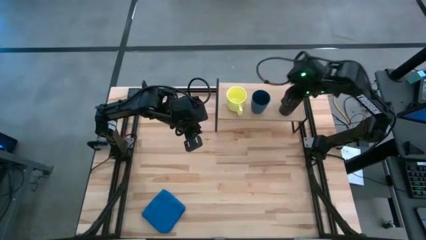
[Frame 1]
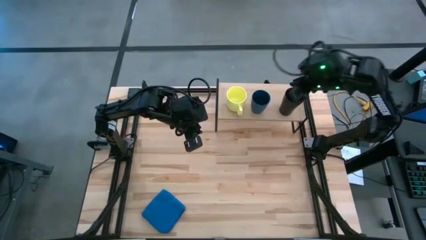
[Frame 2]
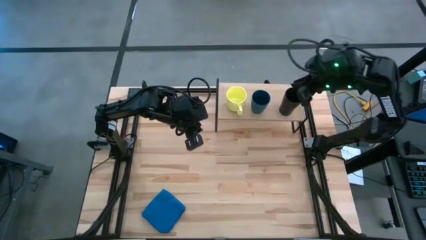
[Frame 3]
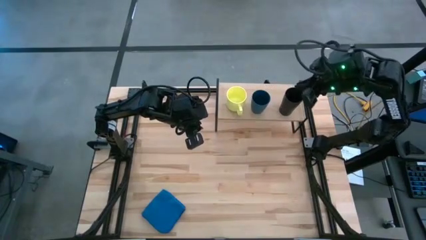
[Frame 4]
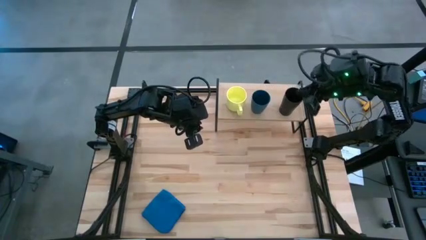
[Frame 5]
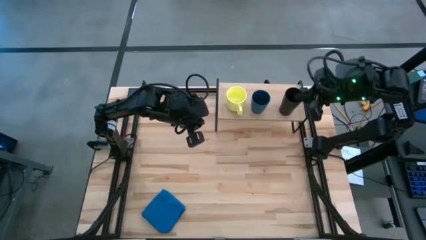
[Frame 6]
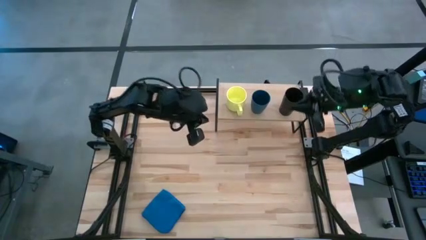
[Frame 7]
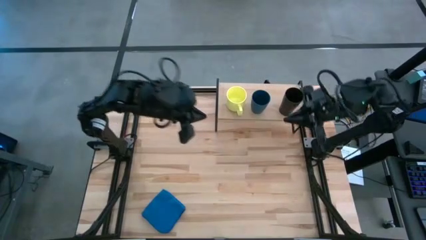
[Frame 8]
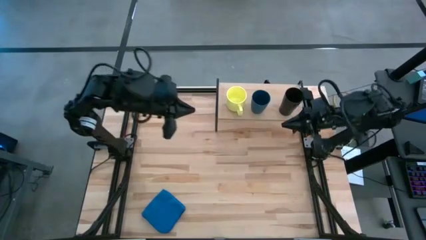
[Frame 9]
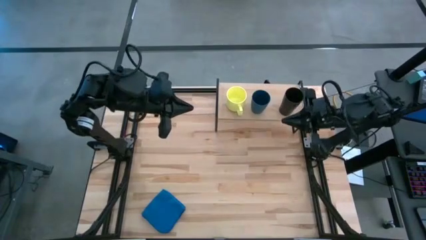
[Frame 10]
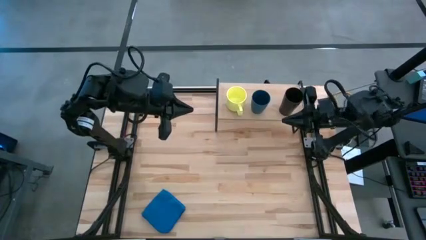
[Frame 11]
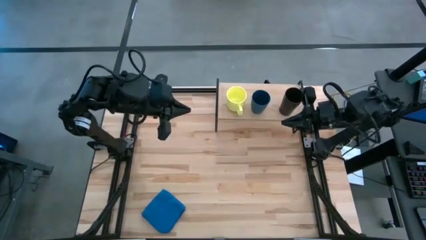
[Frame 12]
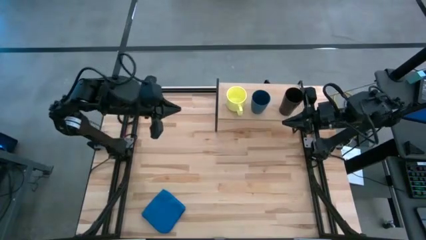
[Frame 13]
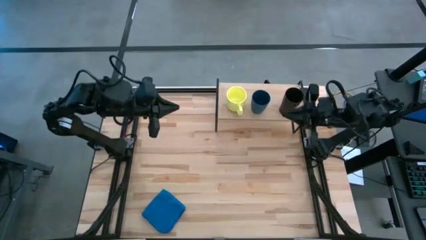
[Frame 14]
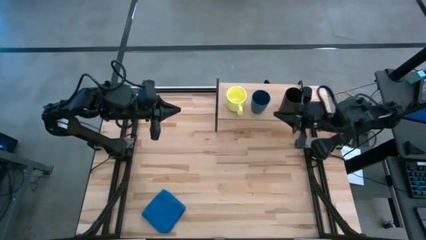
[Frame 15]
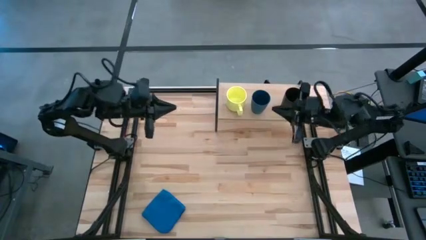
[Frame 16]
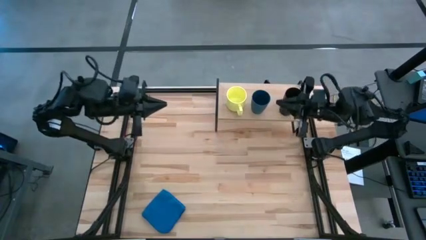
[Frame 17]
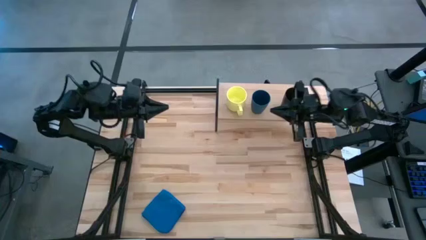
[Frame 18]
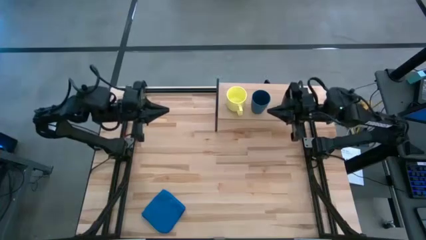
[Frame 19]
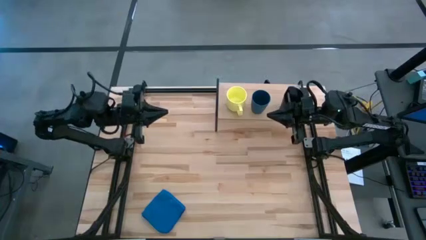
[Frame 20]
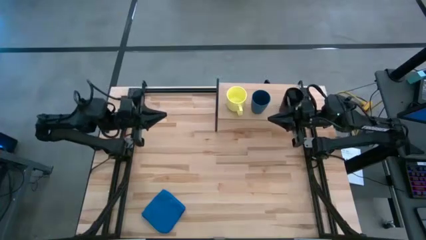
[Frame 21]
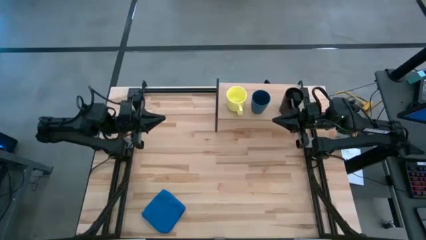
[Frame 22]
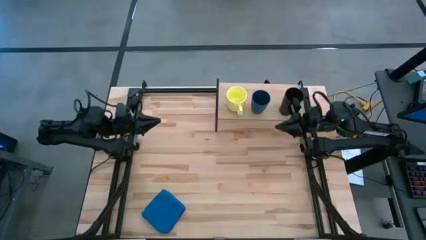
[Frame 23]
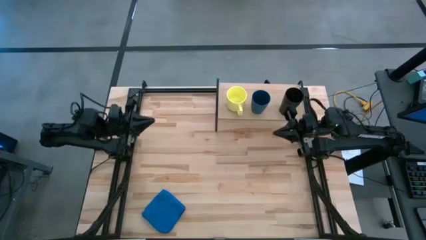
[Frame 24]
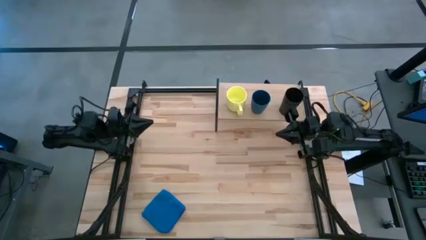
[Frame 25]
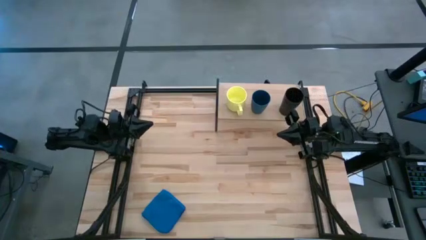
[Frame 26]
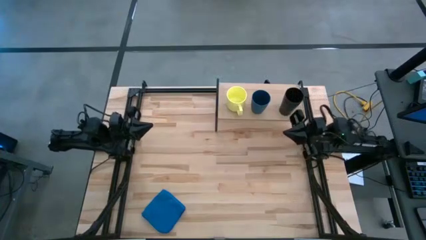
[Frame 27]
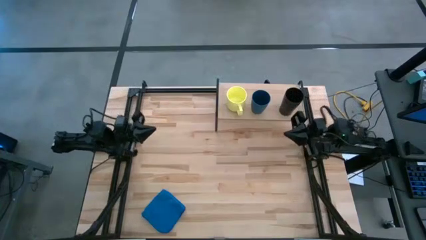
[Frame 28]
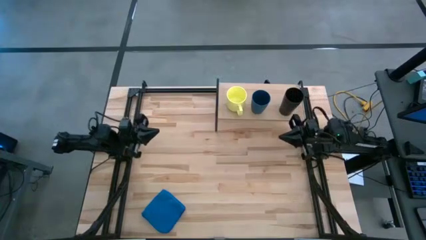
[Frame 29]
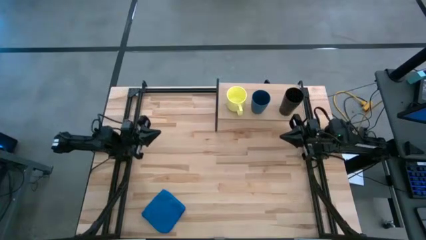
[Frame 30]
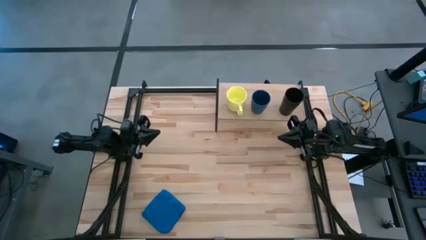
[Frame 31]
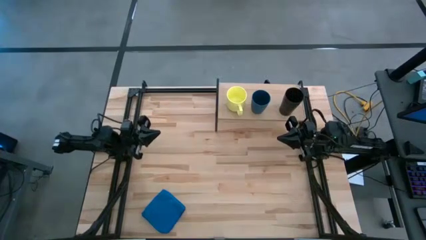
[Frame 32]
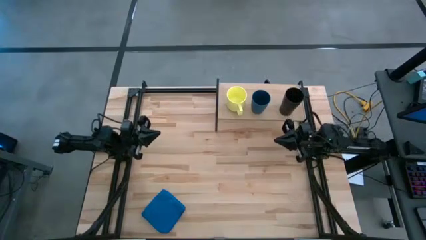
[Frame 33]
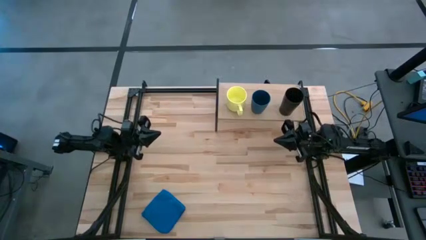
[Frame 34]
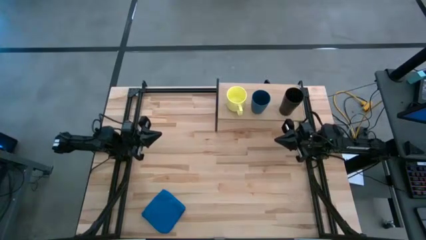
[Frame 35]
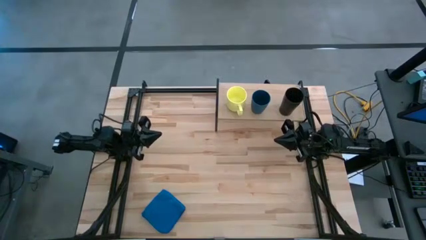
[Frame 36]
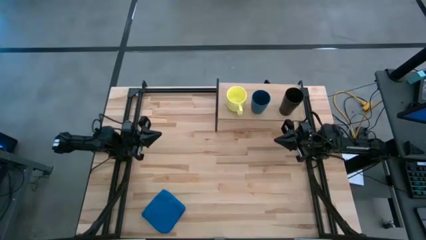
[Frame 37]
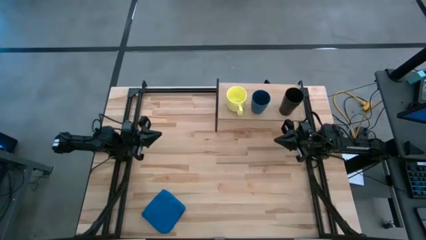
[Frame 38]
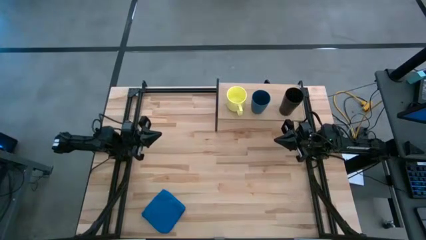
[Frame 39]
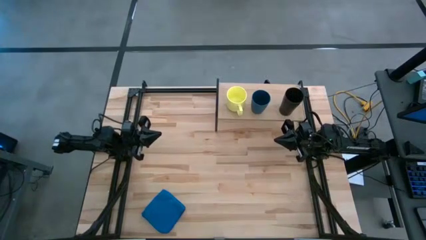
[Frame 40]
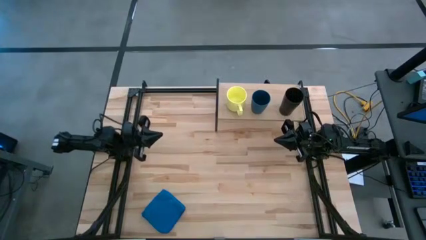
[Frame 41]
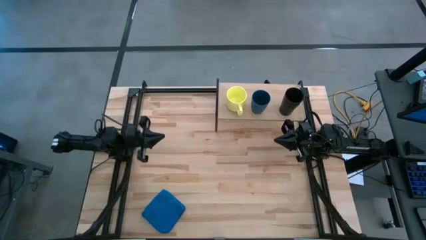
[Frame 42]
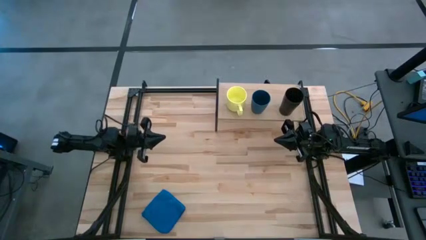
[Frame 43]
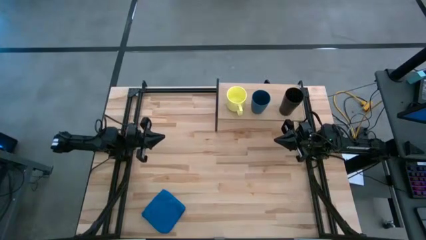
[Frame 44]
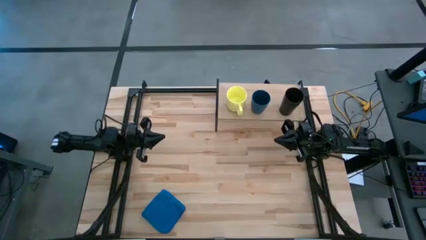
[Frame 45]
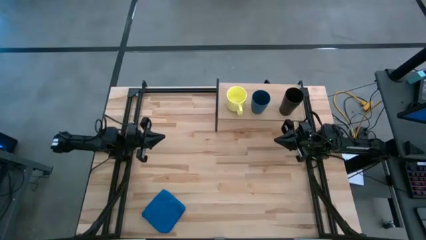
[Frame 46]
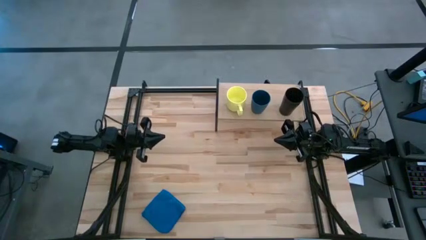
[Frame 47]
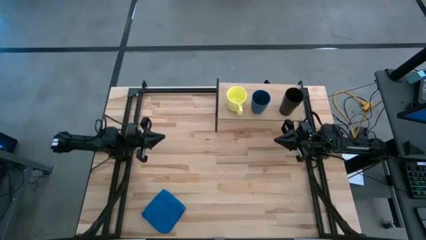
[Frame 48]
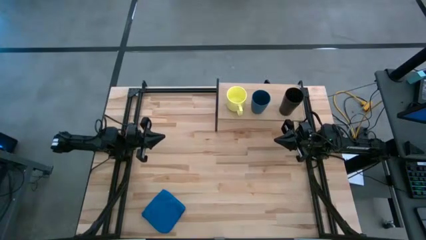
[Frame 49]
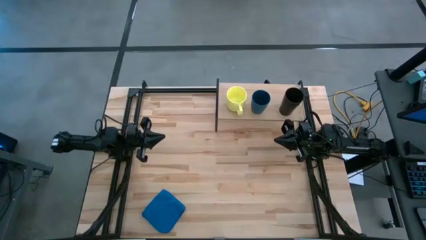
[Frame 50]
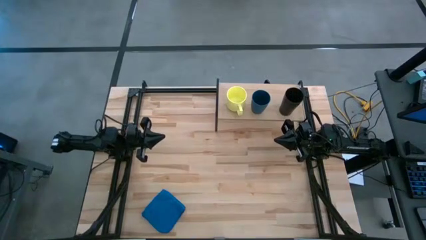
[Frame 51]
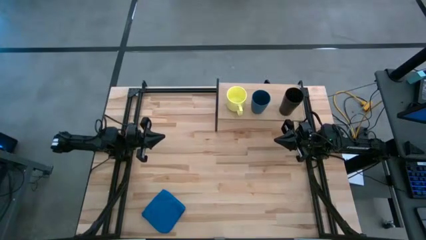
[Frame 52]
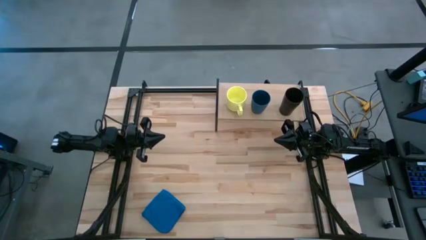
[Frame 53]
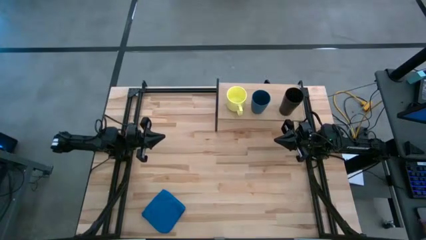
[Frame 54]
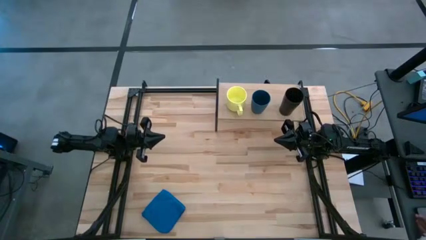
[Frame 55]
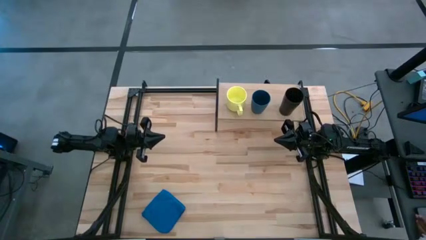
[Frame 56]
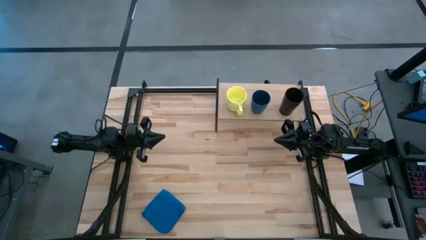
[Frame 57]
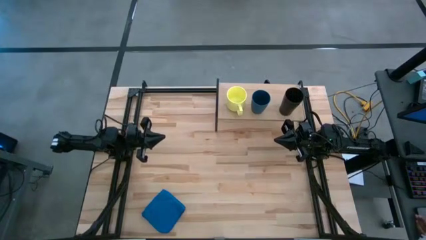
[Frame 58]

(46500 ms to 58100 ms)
Task: Stack small to large cups/mugs on shelf
Return to Home Position

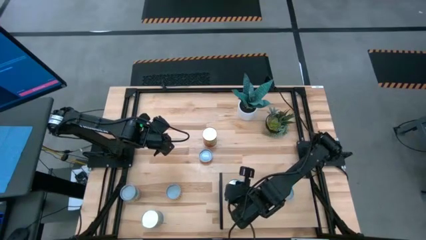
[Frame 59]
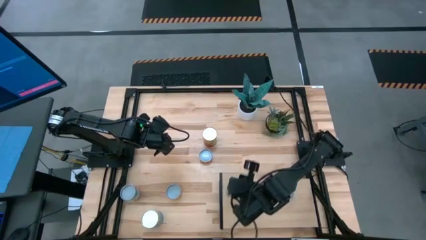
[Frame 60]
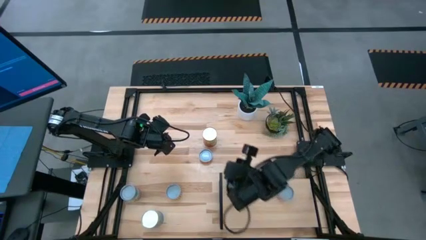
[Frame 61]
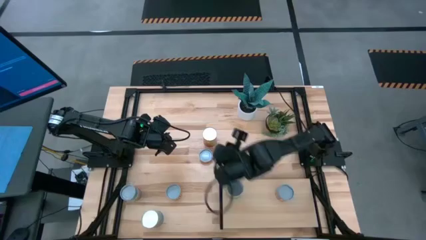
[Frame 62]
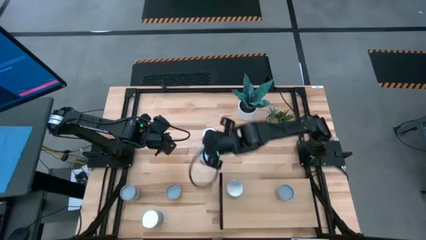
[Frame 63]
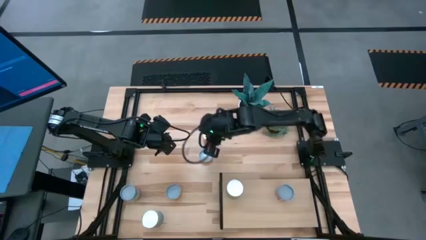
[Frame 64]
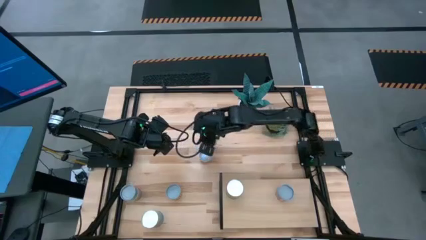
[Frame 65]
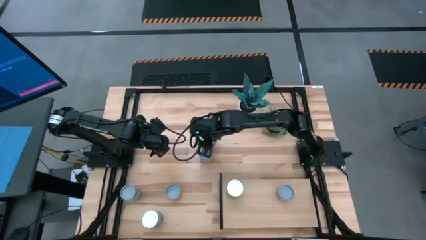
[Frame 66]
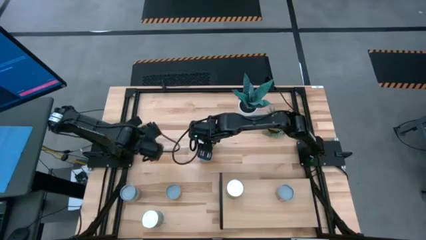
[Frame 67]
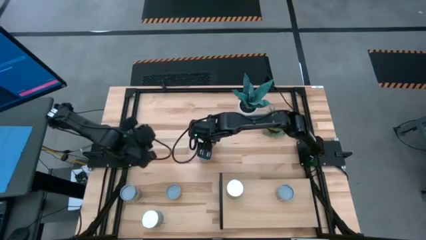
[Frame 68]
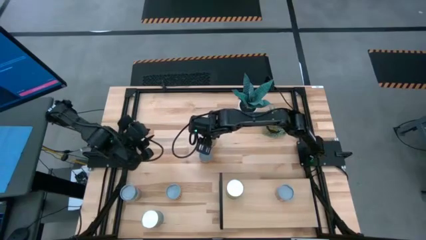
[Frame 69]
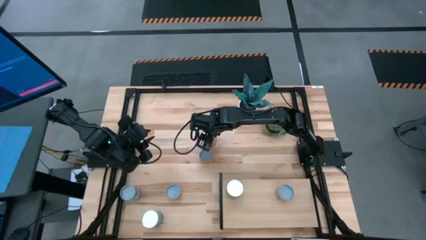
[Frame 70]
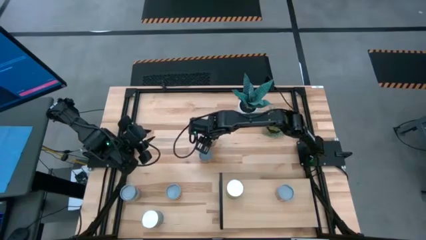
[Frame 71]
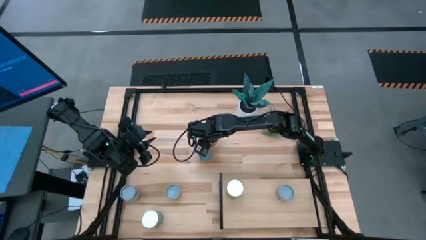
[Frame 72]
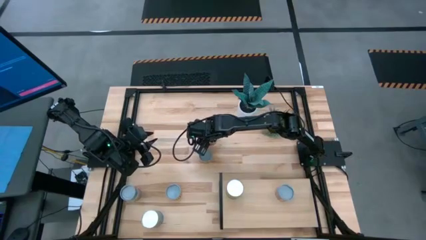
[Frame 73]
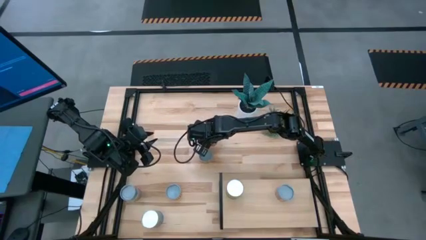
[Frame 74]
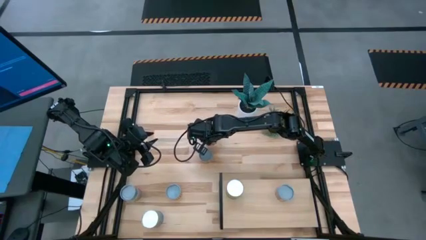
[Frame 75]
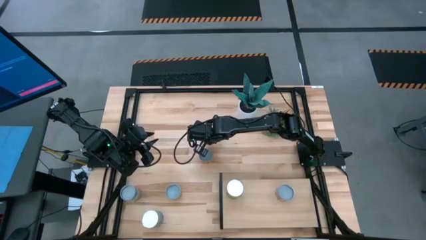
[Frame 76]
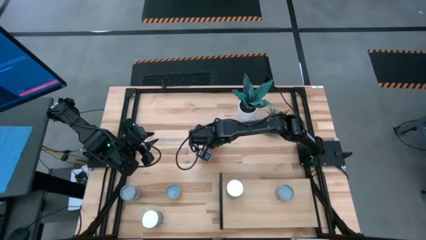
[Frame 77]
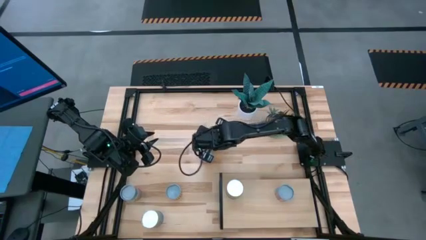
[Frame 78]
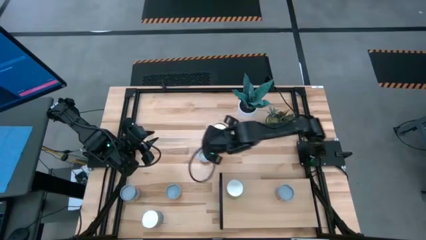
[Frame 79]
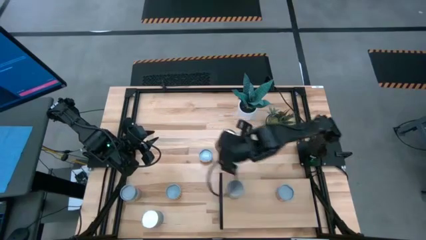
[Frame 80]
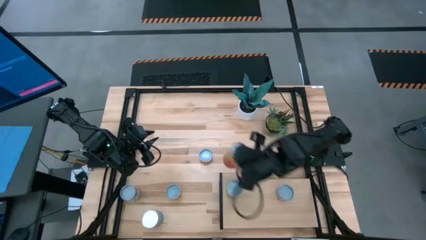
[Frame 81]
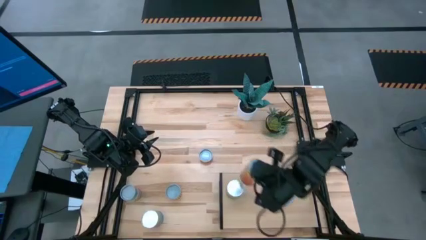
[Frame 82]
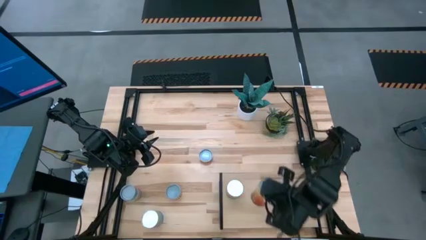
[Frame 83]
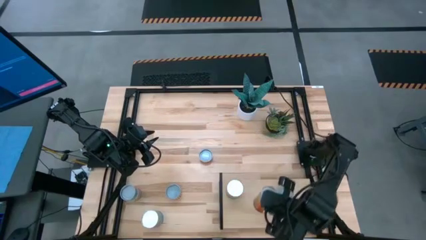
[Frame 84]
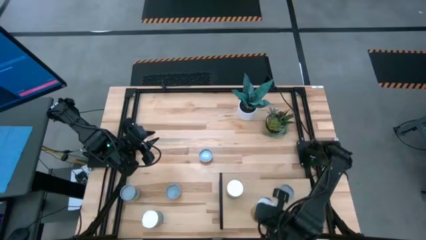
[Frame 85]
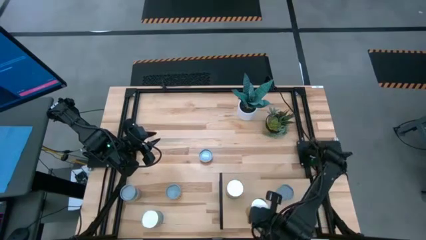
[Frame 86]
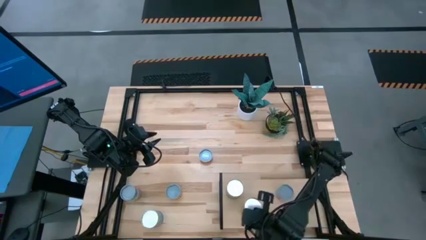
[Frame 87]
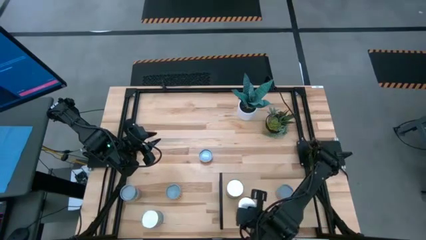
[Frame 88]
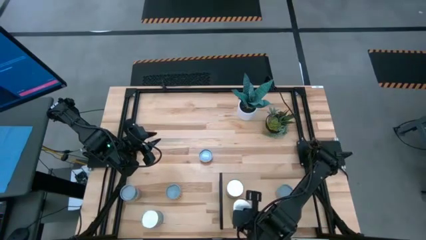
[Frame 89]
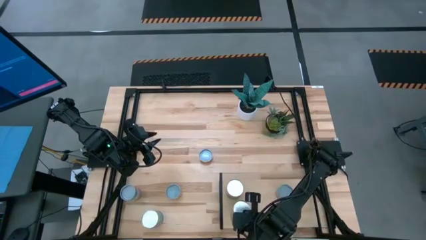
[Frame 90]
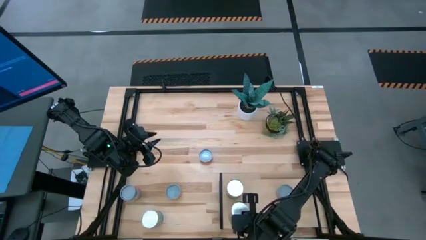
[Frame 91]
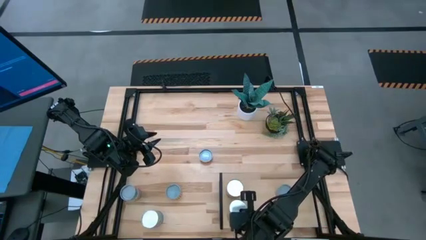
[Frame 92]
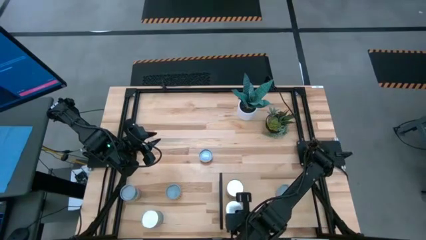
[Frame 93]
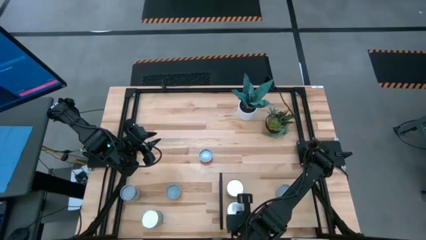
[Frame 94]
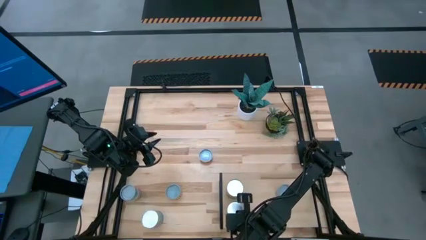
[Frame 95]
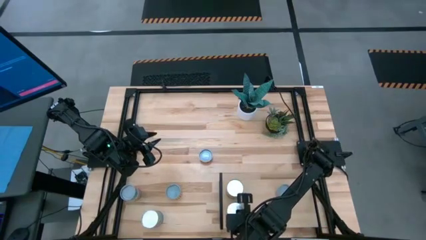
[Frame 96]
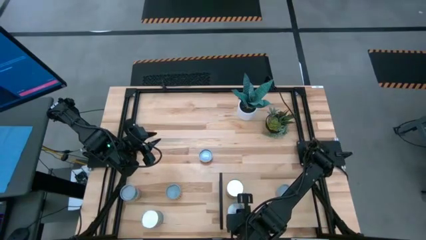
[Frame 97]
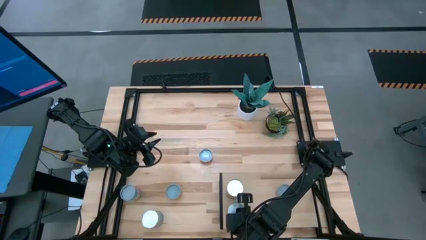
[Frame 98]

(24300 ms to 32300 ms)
Task: Pick and place cans onto a shelf
Put the canned green beans on the shelf
